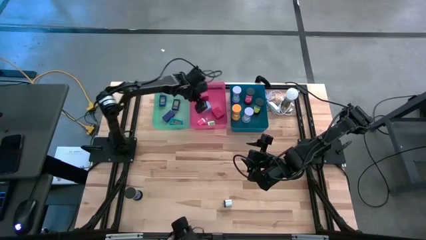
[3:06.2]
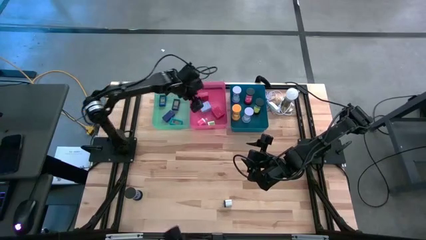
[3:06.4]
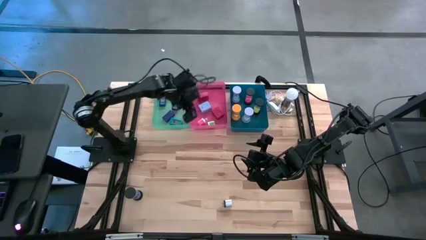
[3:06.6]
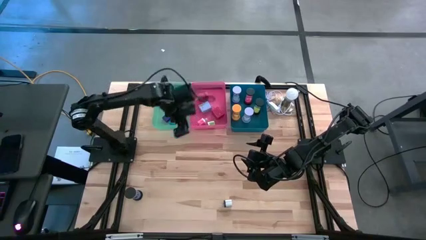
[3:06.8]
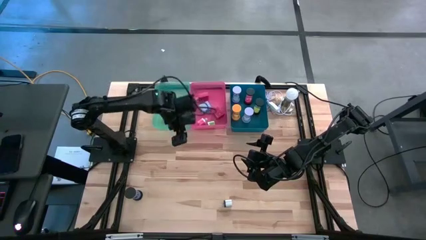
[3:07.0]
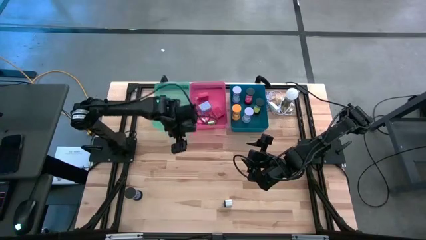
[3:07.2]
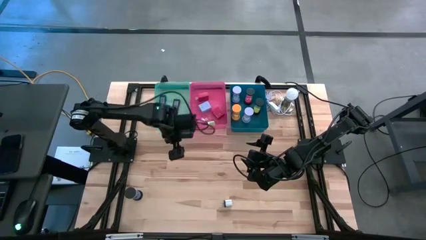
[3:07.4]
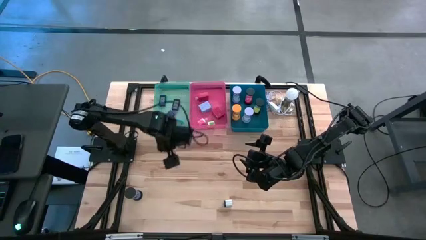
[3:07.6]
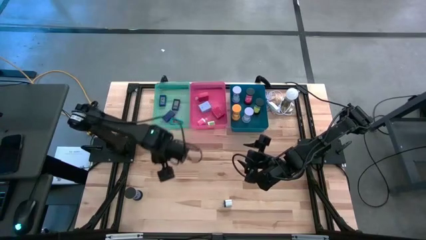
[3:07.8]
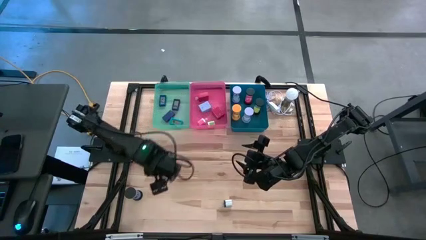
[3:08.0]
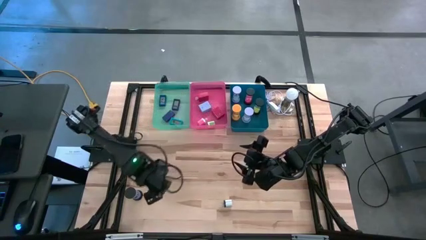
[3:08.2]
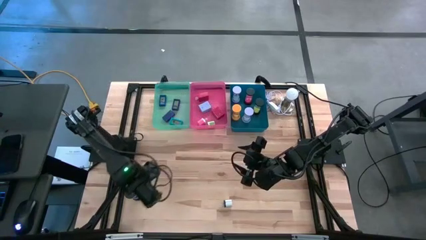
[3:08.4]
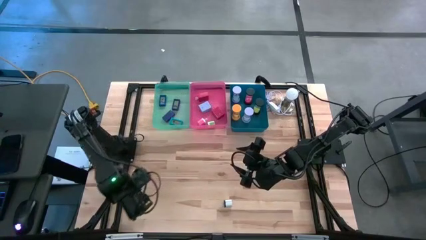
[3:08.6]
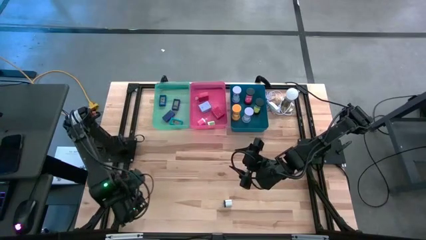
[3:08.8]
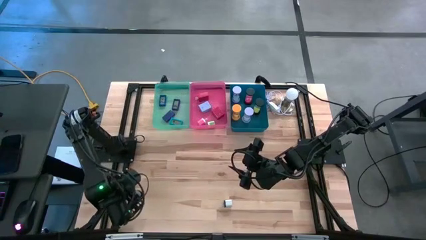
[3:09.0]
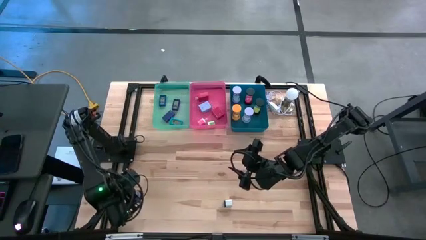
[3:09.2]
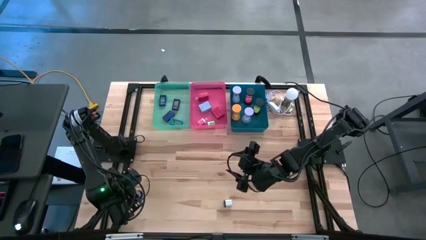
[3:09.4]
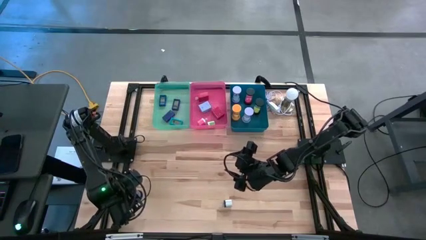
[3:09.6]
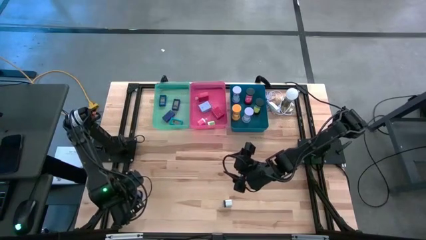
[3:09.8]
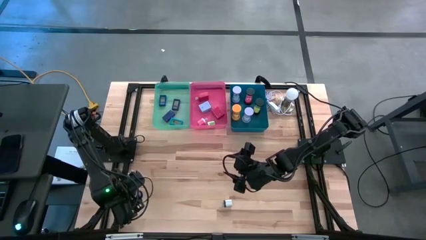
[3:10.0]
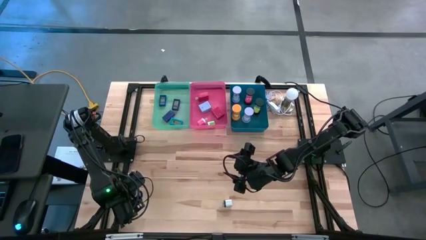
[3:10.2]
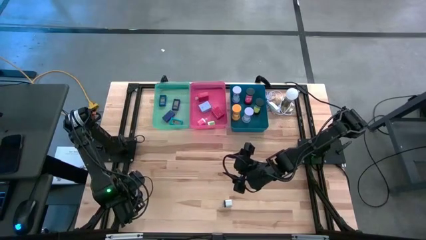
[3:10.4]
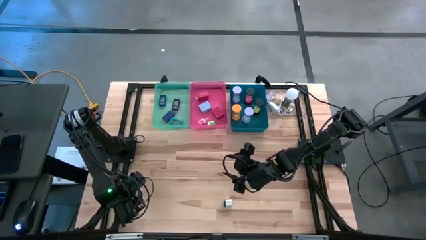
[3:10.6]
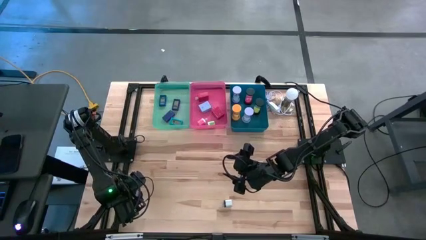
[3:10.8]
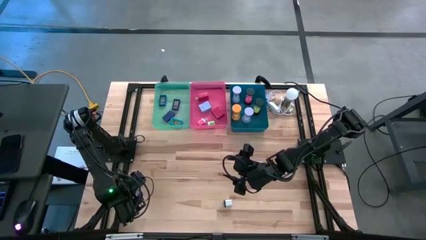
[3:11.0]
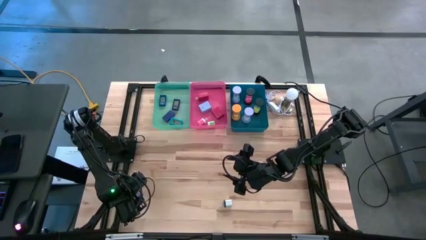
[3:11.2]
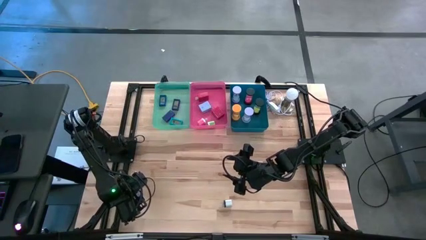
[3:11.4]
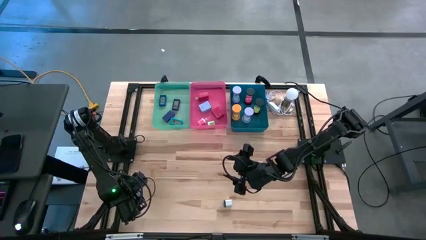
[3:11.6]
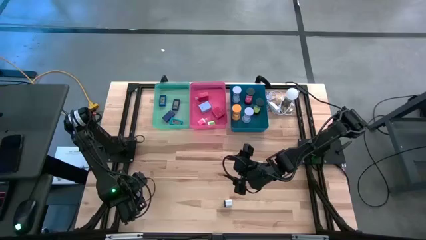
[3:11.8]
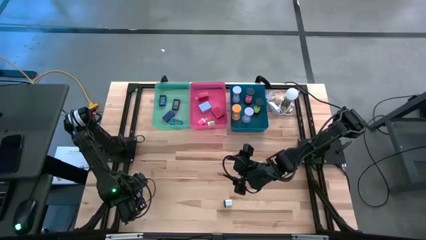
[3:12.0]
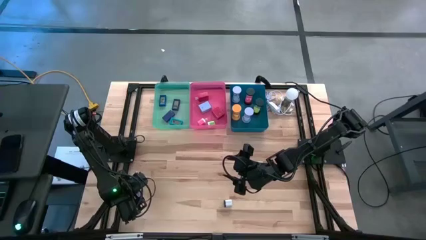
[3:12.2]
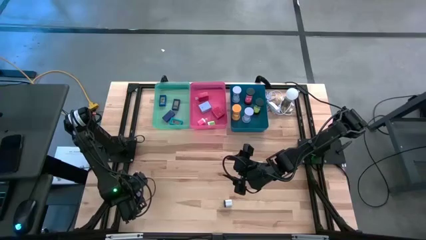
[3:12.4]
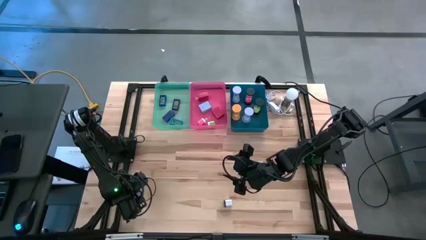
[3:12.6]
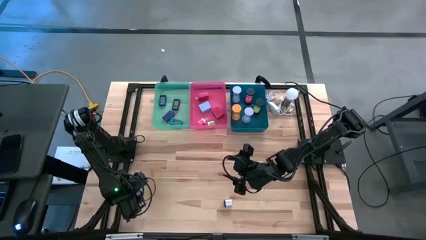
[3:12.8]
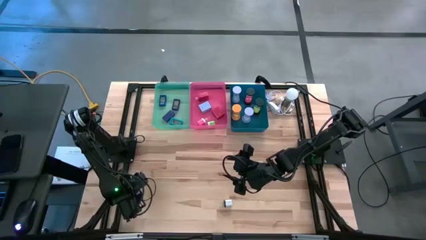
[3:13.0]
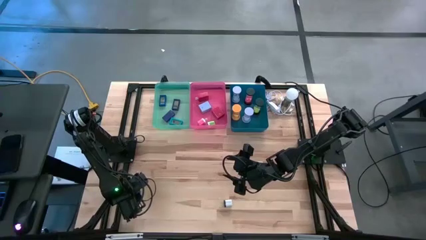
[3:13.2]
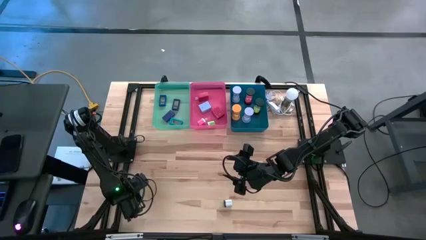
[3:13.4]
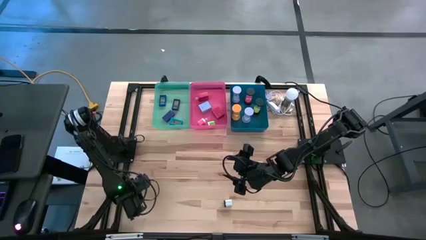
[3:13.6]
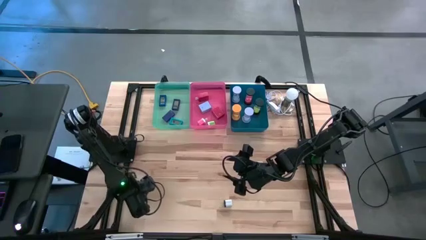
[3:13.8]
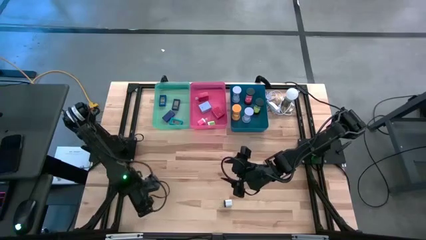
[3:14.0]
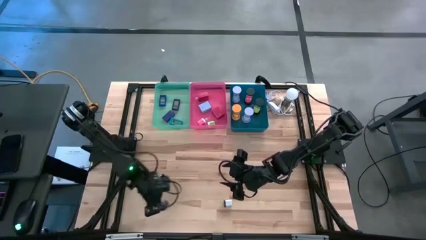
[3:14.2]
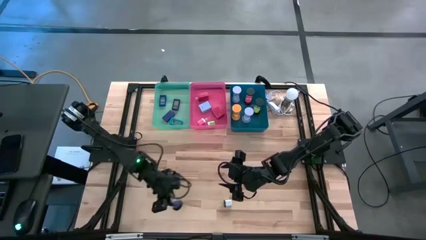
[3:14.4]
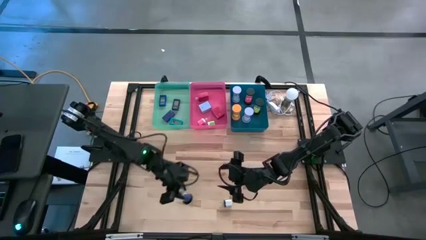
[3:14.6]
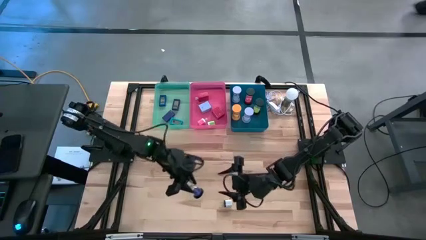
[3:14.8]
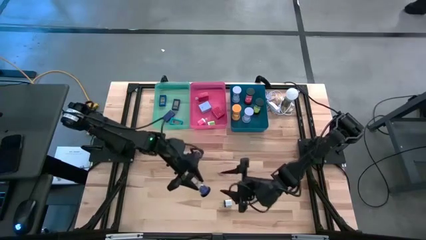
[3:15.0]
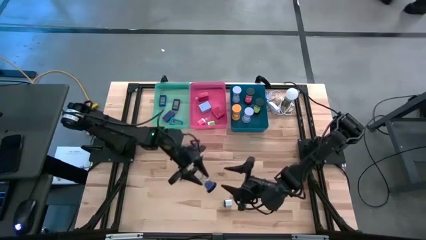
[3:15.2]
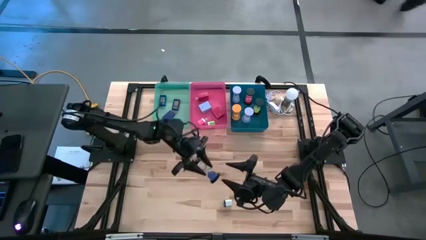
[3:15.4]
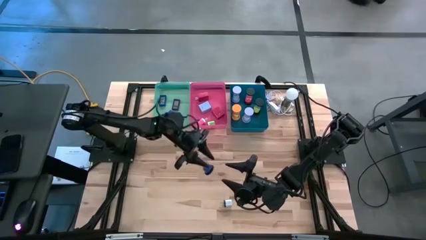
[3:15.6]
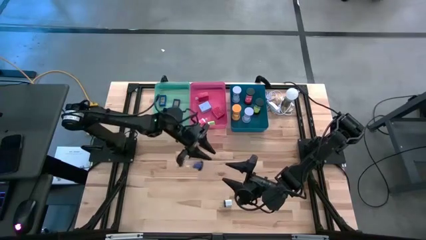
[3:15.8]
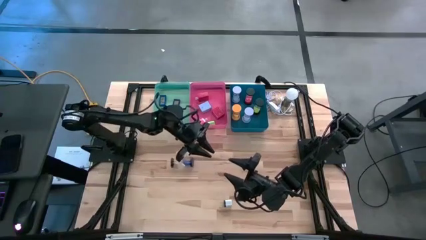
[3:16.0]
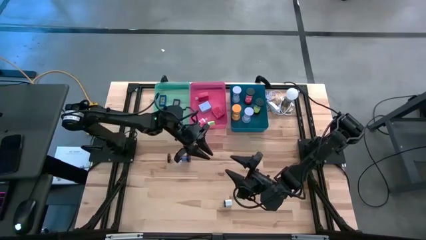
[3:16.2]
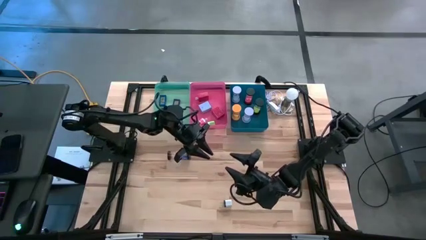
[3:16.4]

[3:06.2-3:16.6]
Task: Pick & Place Office items
Put the blue hourglass into the blue bin

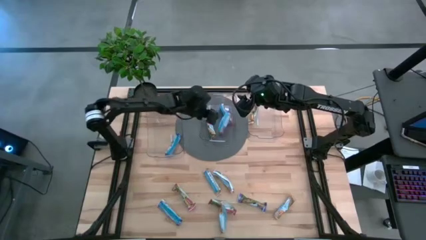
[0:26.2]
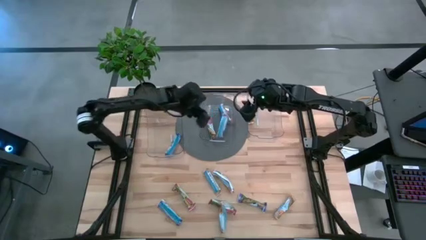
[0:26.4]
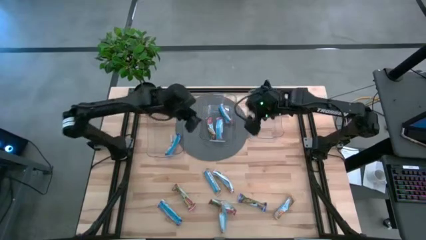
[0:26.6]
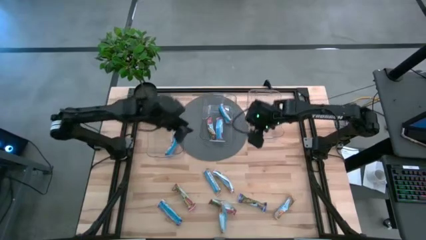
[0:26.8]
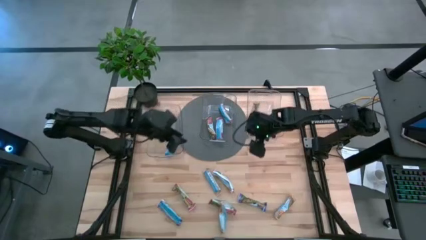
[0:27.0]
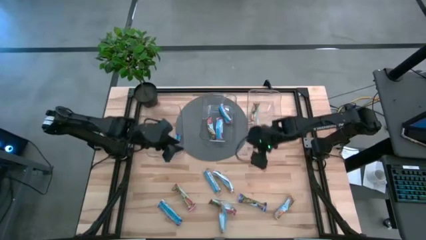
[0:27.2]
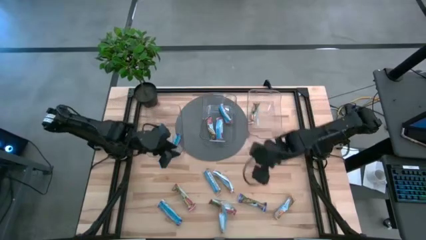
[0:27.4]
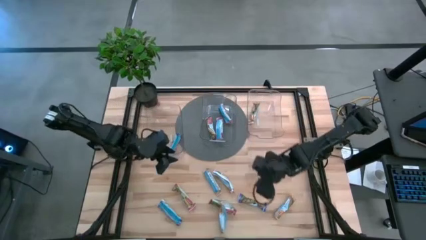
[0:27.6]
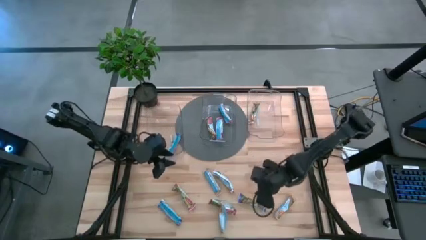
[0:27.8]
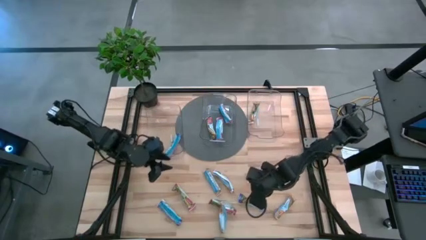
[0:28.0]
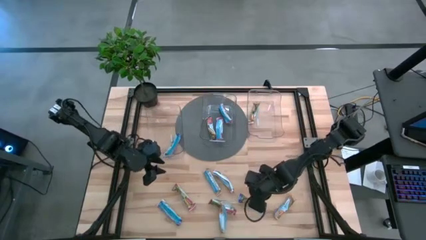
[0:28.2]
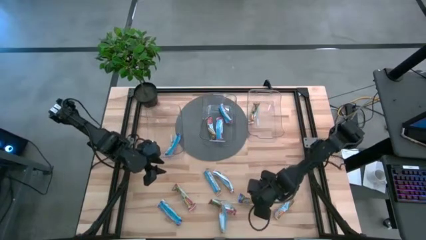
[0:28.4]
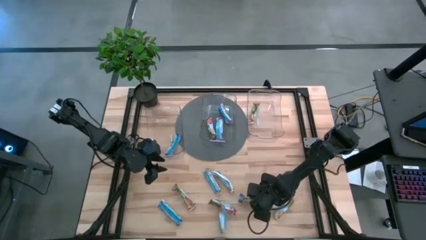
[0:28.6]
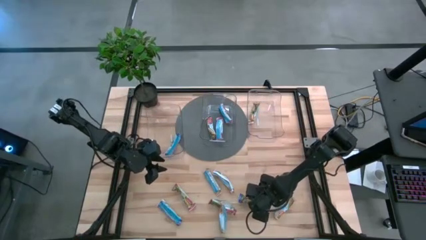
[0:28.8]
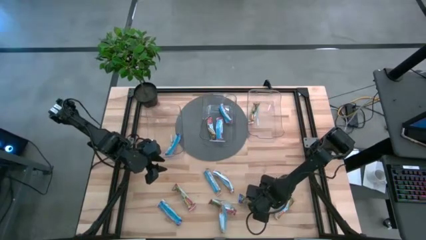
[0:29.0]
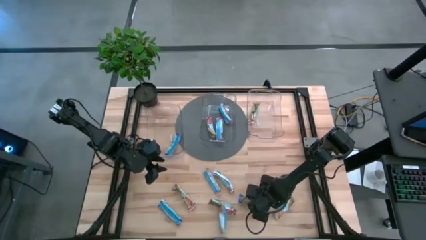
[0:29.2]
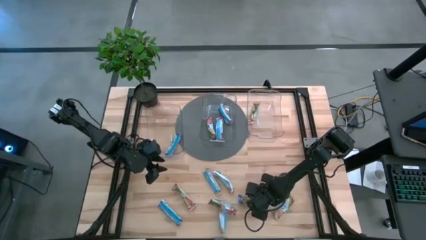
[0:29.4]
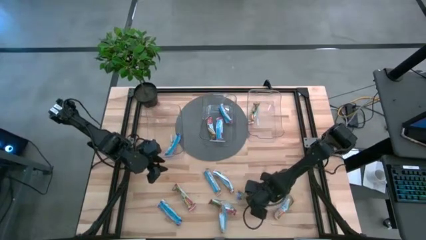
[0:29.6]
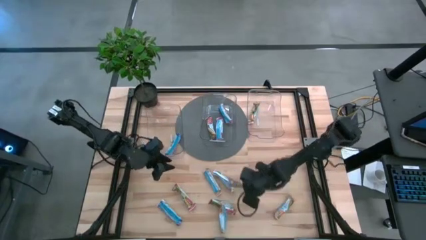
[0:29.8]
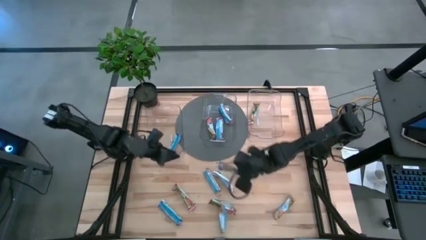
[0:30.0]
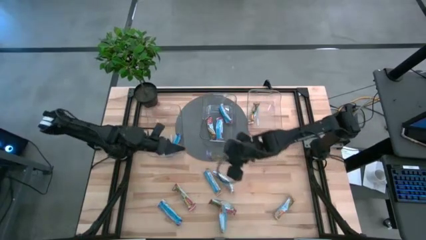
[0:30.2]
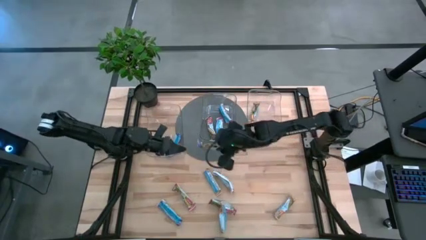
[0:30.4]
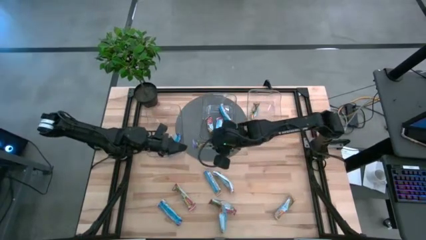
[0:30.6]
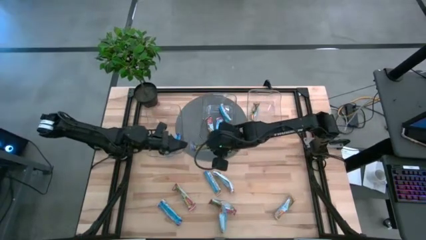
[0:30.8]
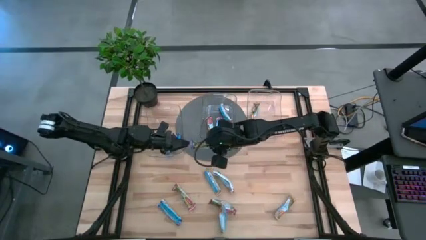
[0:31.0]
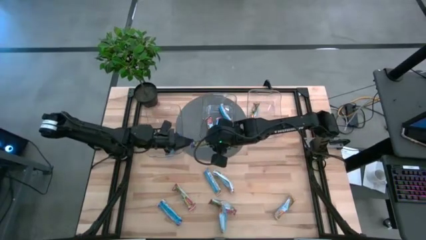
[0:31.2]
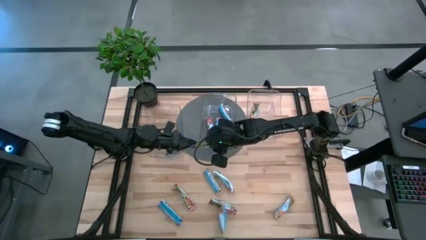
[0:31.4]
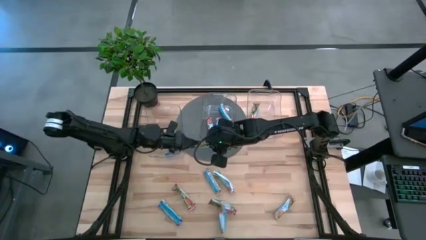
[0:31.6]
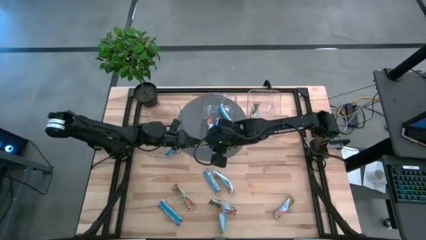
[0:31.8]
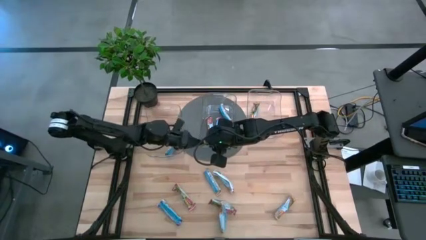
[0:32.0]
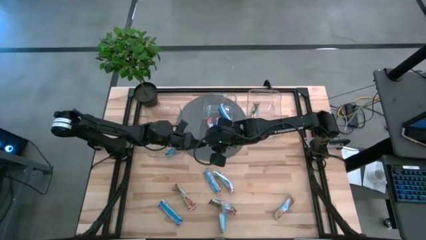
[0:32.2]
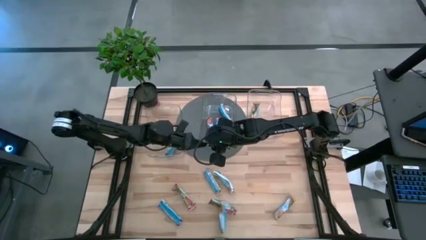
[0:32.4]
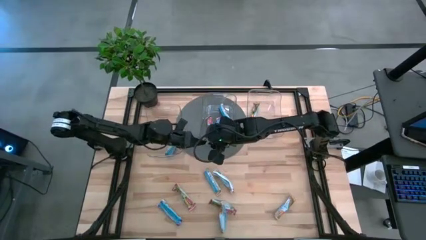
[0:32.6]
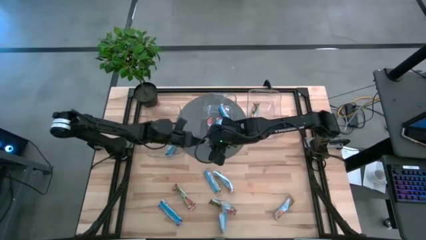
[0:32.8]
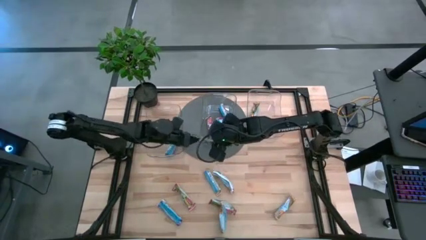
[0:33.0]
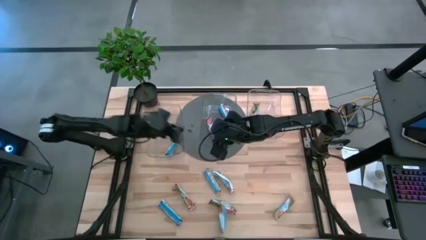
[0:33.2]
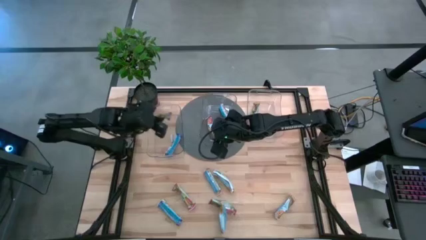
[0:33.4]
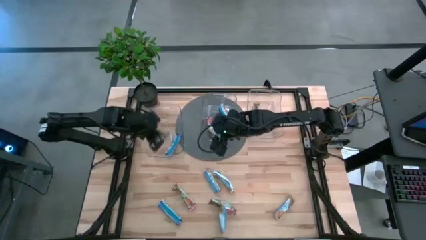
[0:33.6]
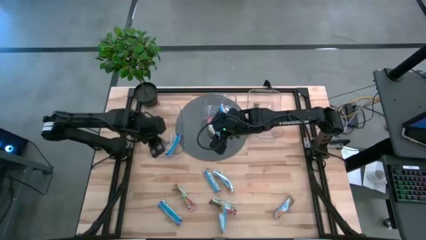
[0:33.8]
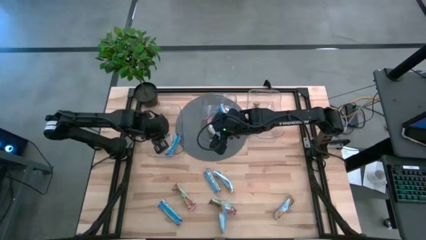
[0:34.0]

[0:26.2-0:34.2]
Task: Pick and place Granola Bars by type
Put the right green granola bar into the left transparent bin
